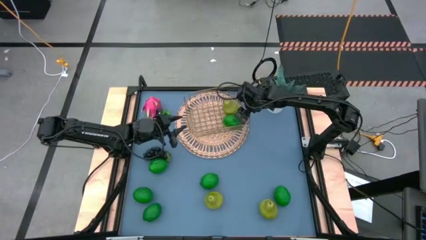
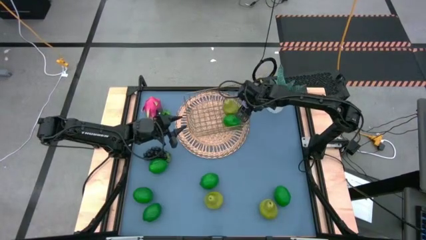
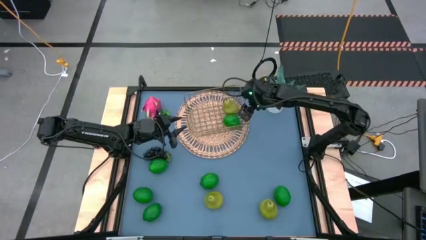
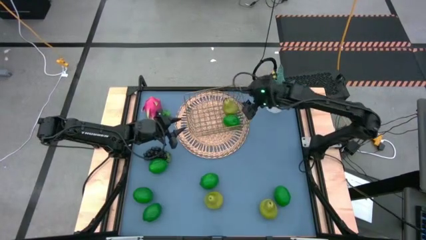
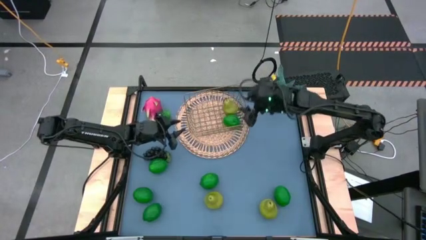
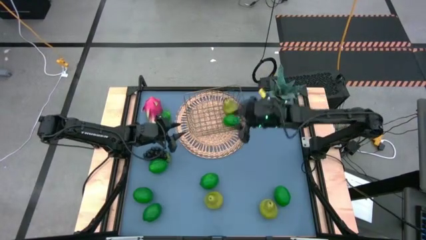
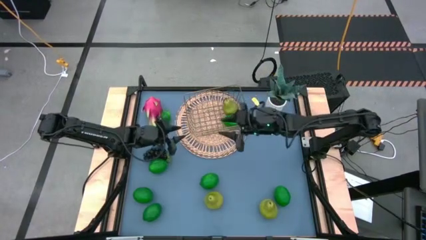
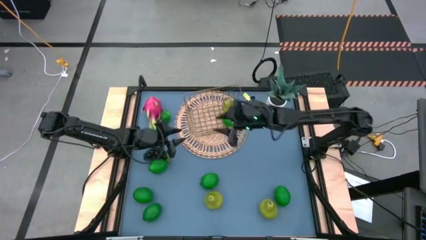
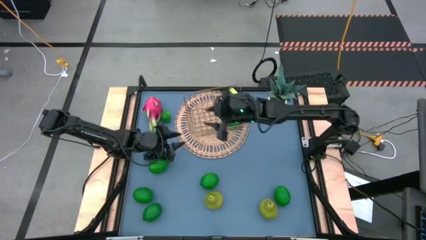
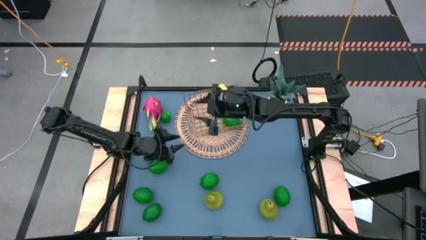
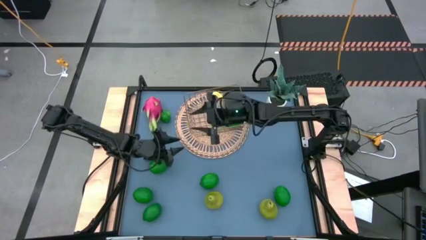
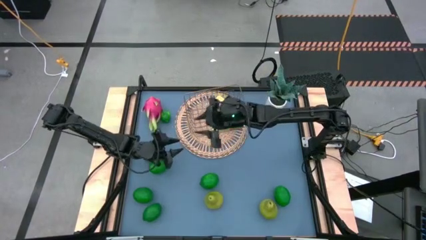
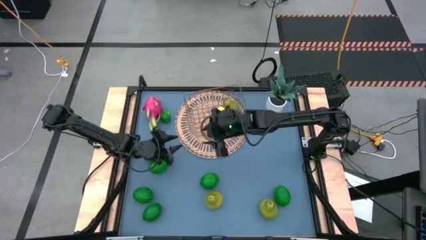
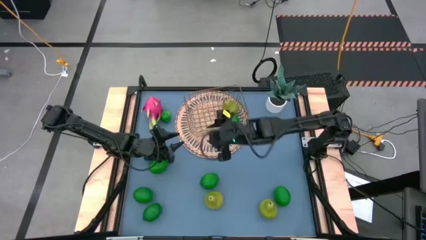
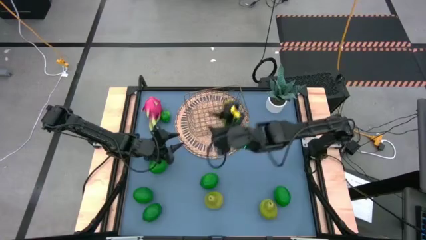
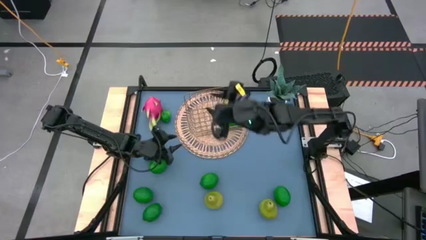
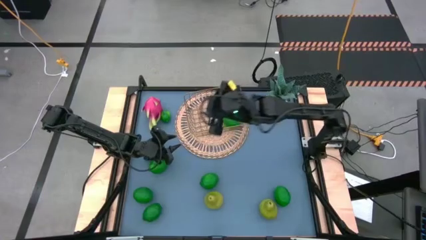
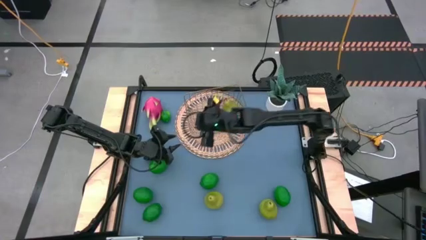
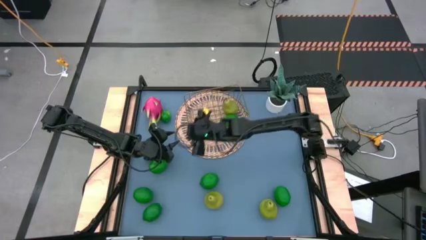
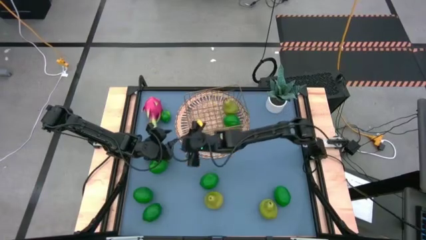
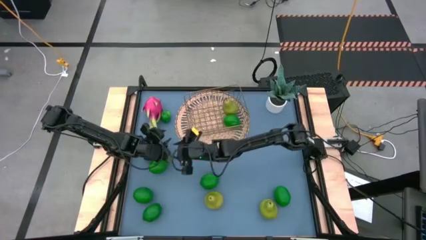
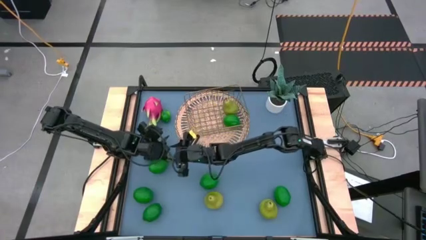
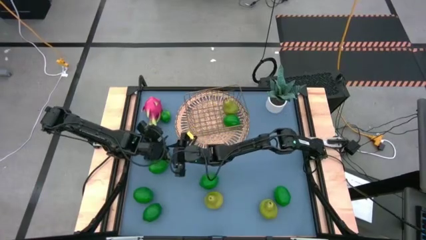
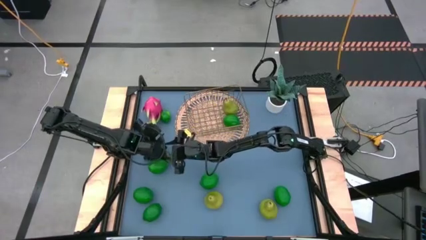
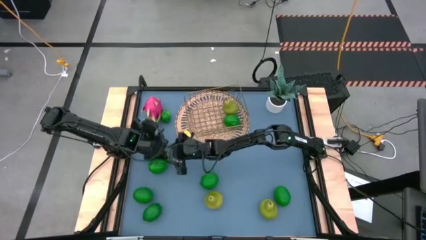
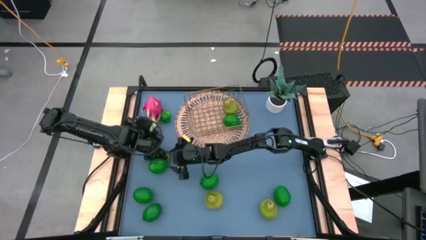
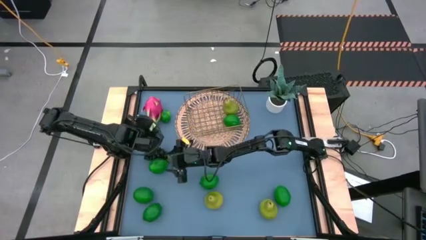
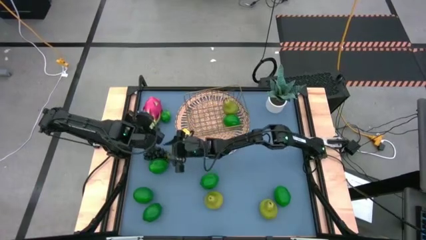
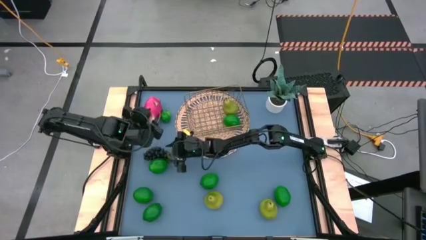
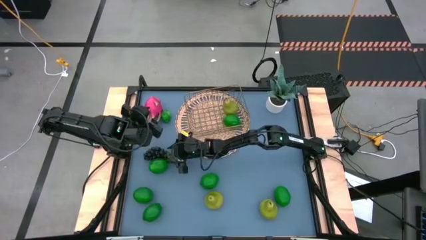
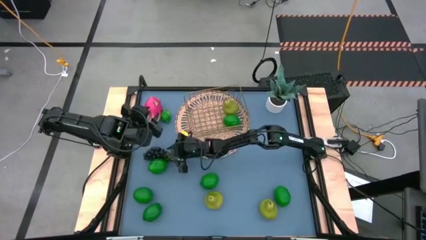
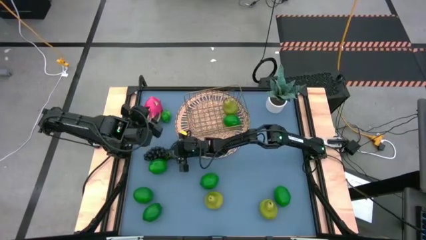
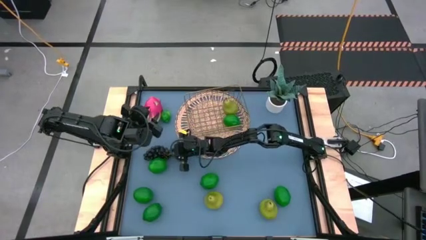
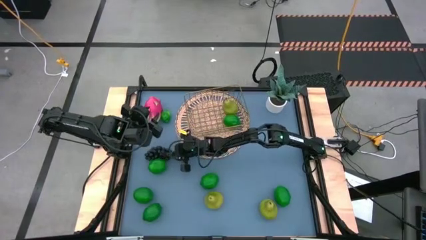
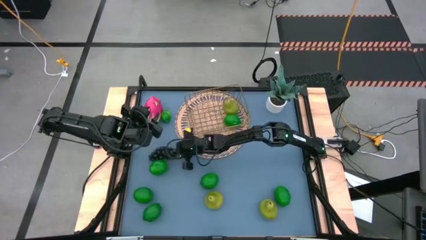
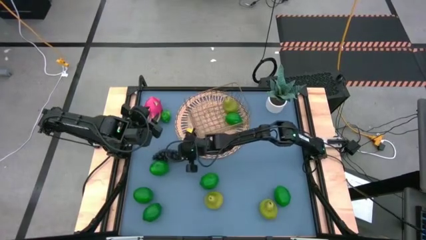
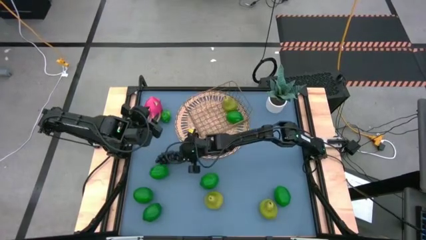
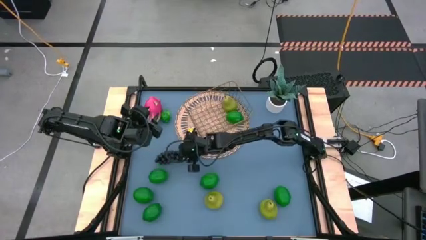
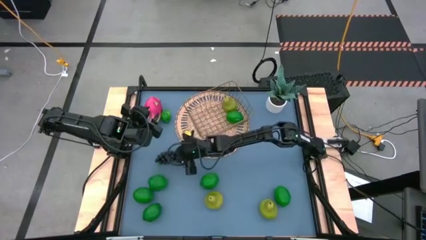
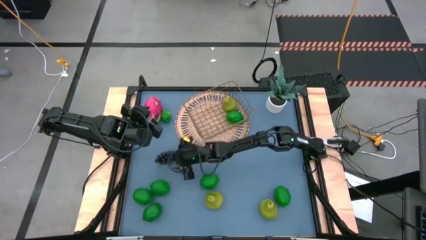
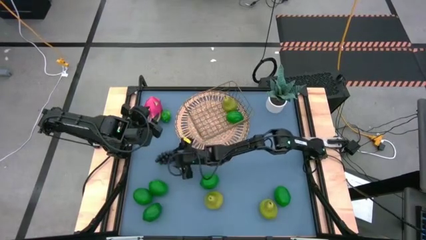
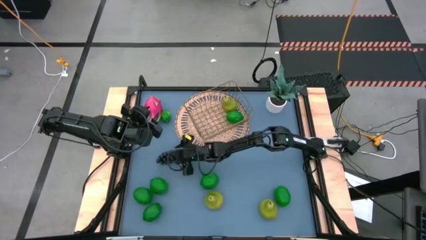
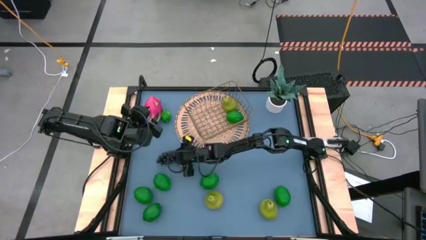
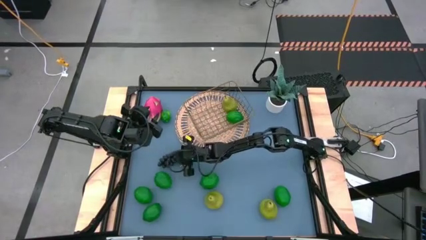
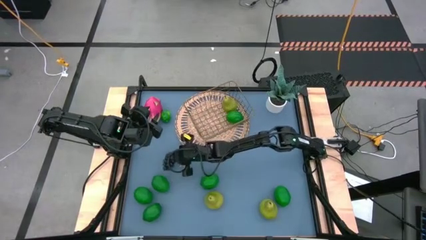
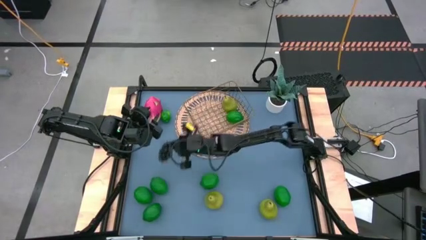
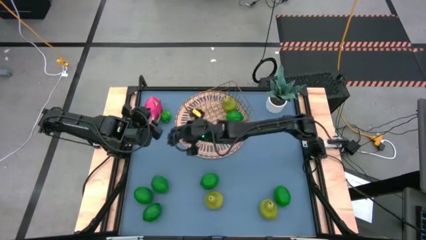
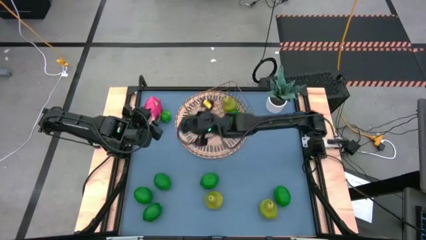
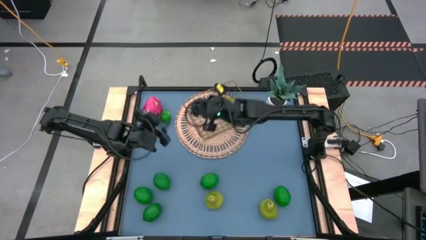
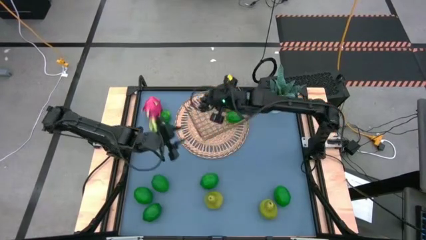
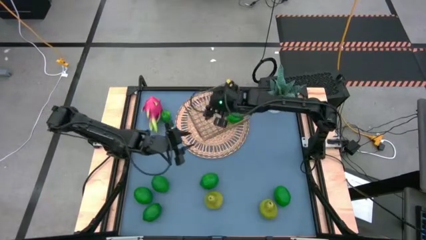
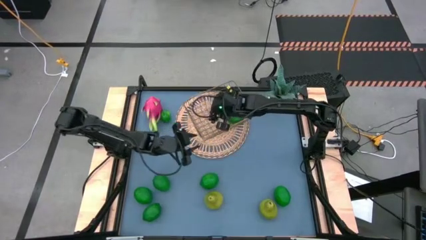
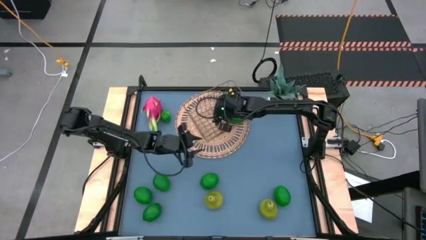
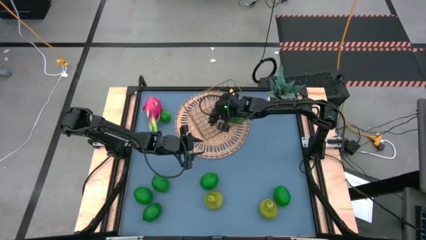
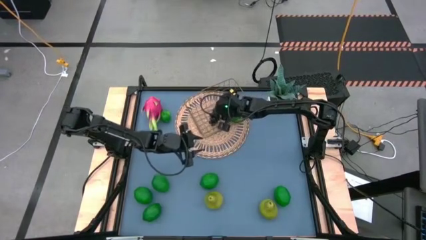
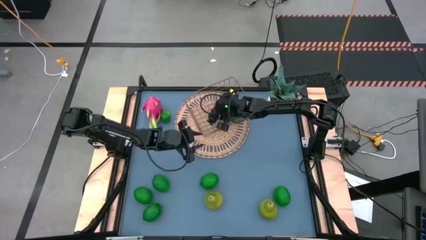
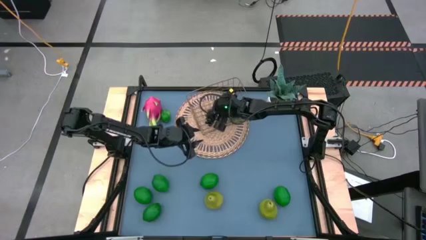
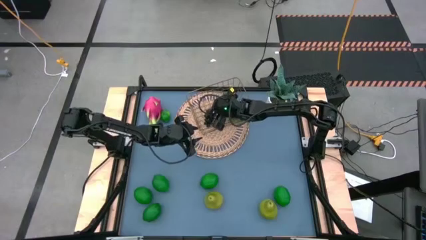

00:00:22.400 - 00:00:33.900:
Task: Build produce basket
Put the violet grapes into the wire basket

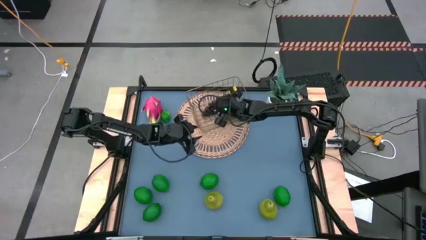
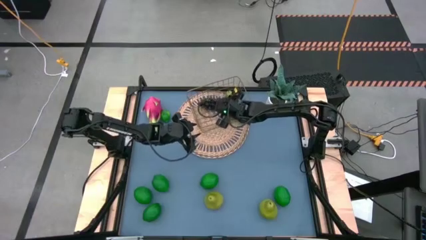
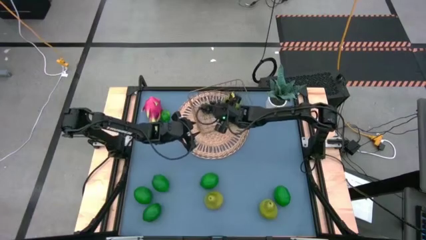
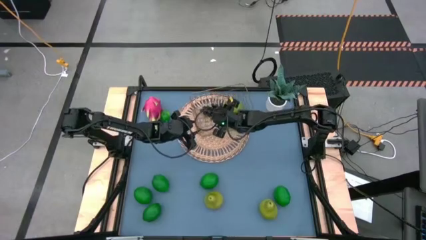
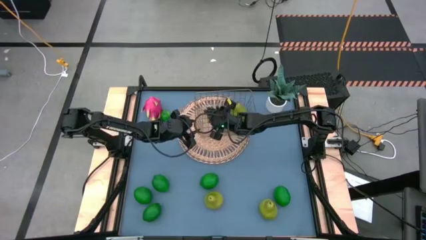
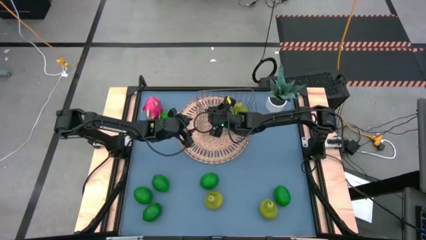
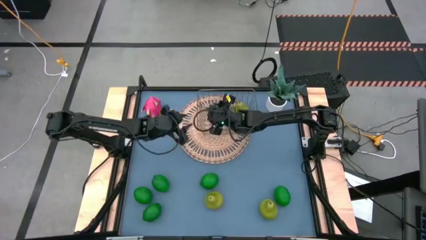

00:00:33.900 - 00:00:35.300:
Adjust the wire basket
